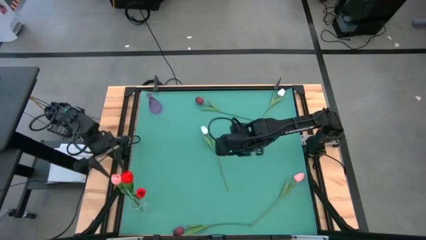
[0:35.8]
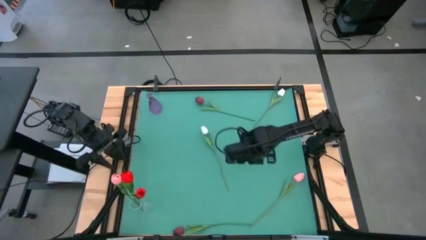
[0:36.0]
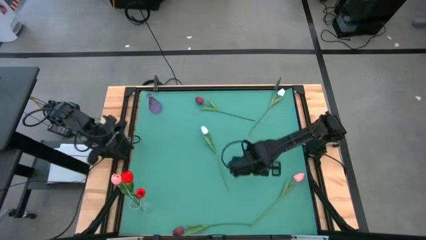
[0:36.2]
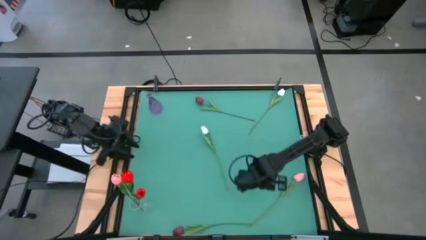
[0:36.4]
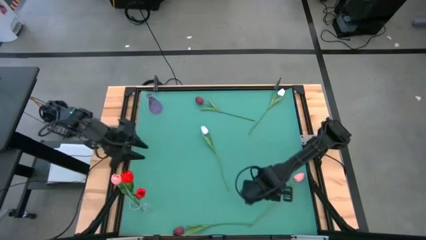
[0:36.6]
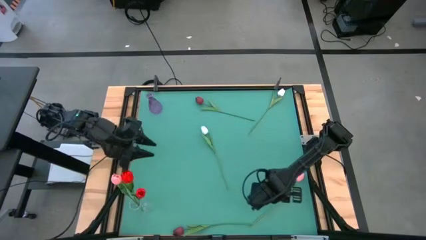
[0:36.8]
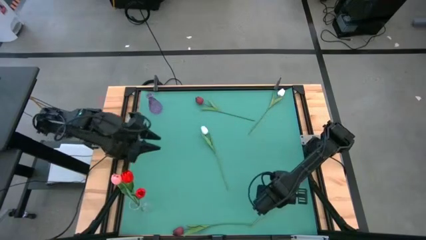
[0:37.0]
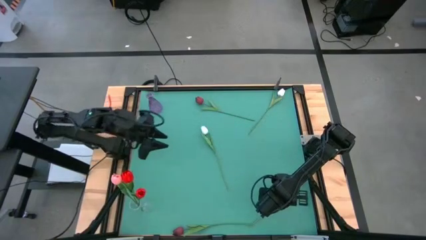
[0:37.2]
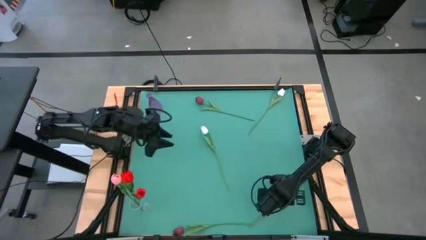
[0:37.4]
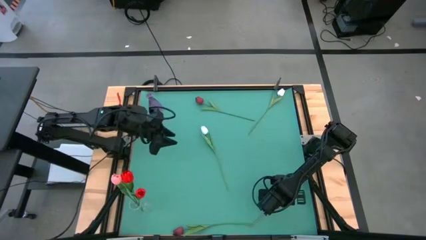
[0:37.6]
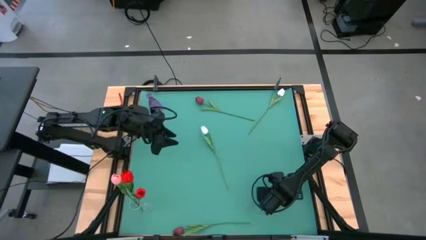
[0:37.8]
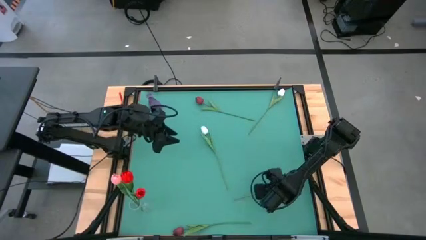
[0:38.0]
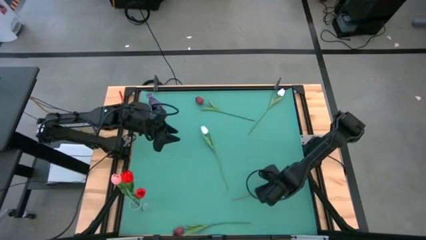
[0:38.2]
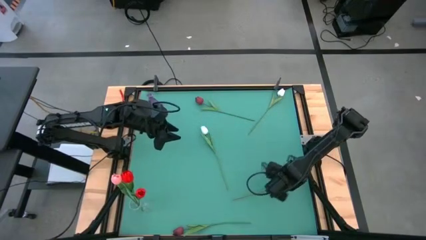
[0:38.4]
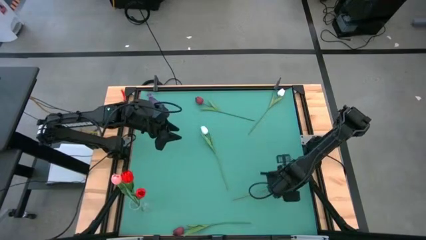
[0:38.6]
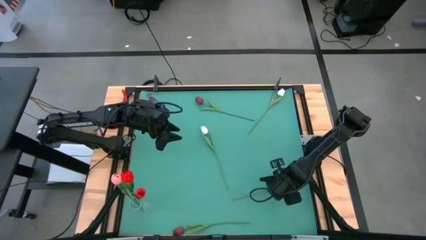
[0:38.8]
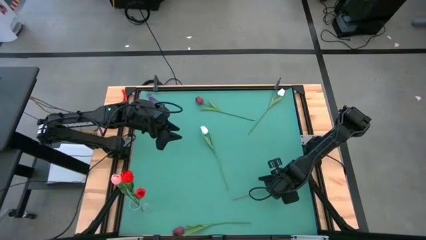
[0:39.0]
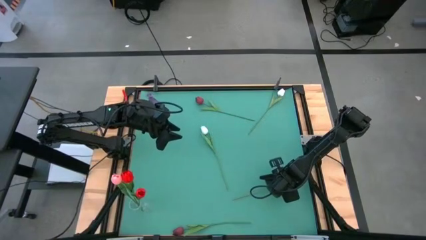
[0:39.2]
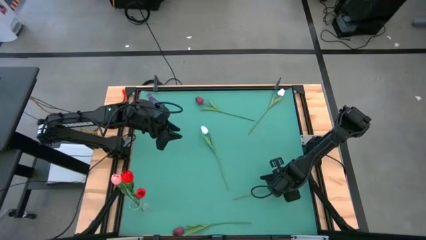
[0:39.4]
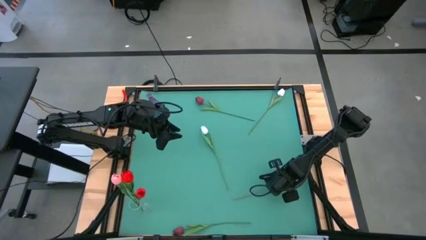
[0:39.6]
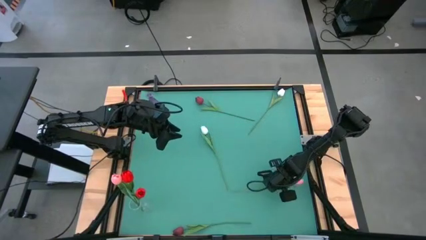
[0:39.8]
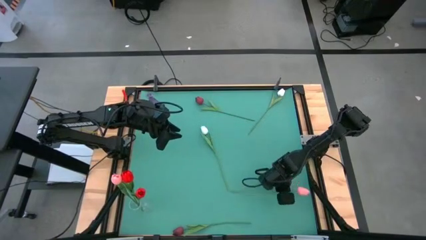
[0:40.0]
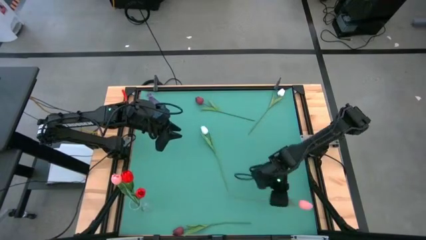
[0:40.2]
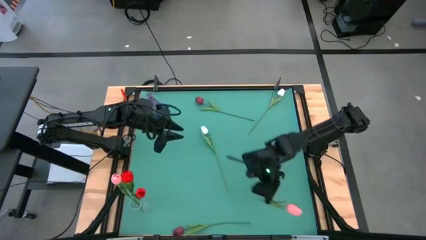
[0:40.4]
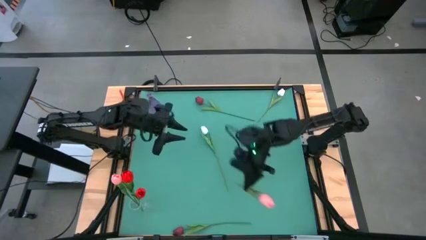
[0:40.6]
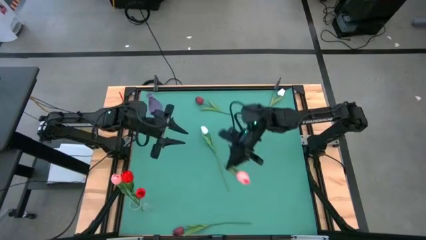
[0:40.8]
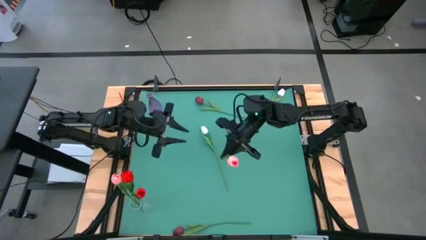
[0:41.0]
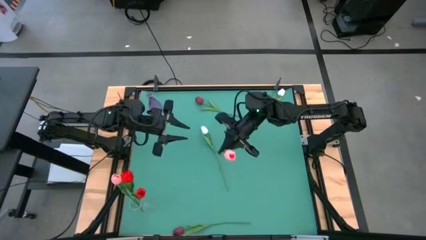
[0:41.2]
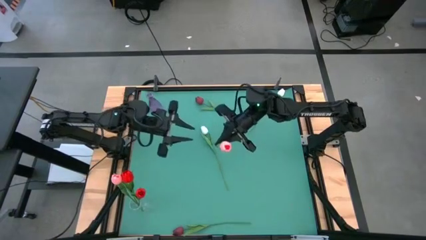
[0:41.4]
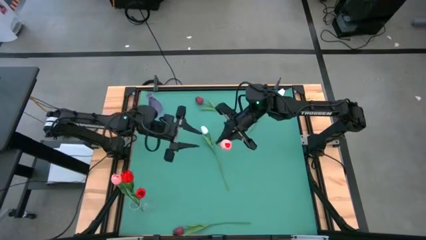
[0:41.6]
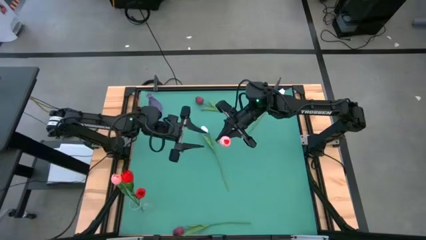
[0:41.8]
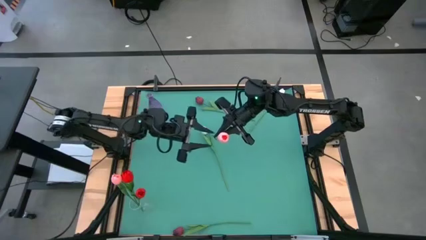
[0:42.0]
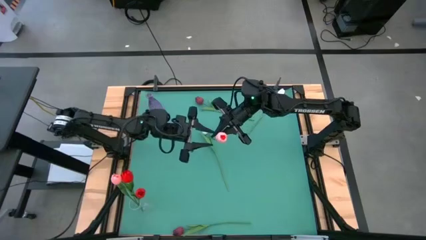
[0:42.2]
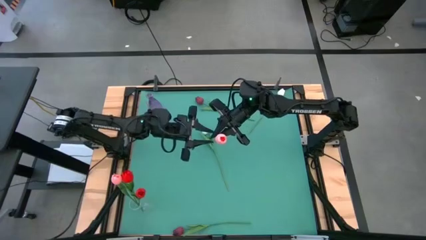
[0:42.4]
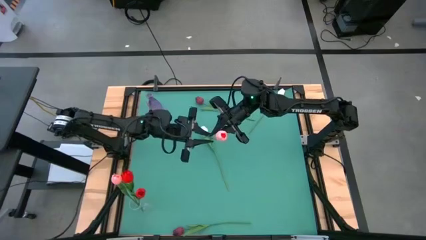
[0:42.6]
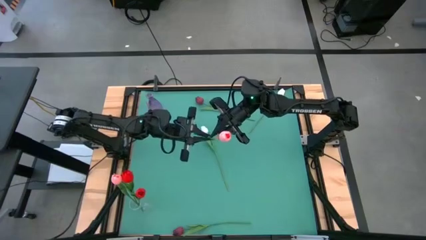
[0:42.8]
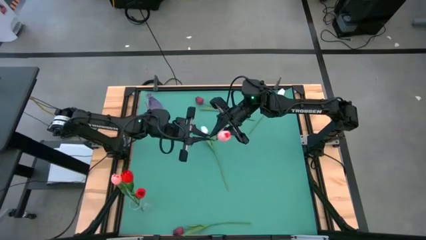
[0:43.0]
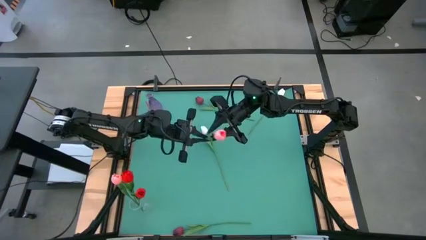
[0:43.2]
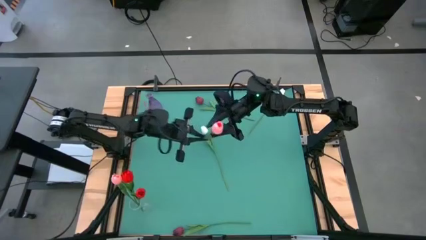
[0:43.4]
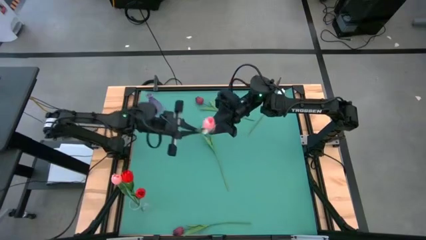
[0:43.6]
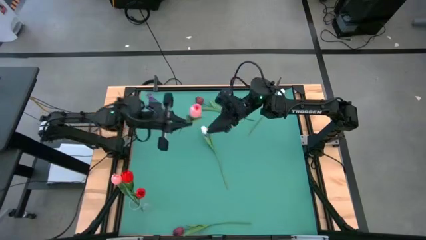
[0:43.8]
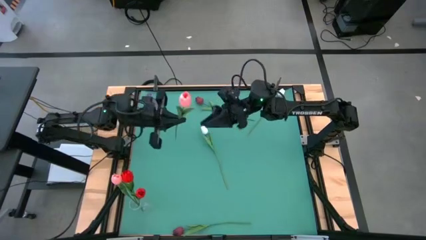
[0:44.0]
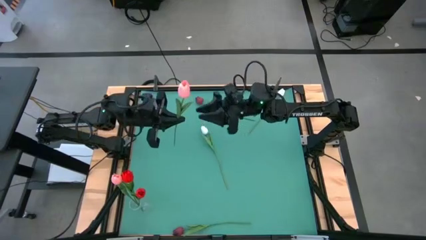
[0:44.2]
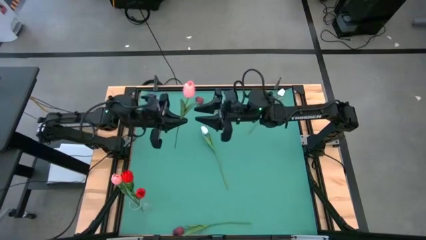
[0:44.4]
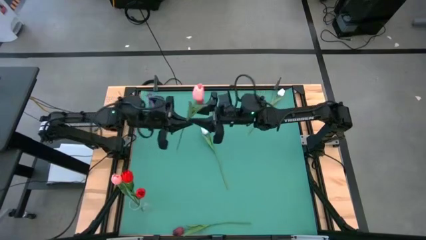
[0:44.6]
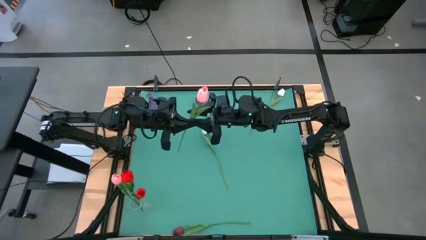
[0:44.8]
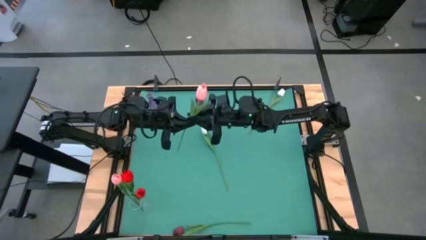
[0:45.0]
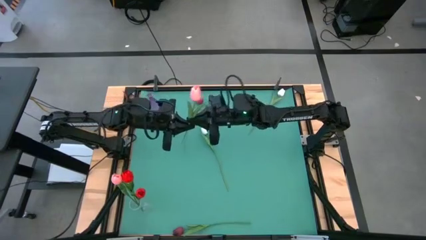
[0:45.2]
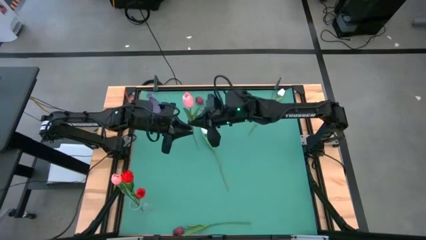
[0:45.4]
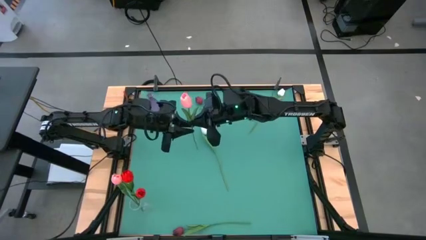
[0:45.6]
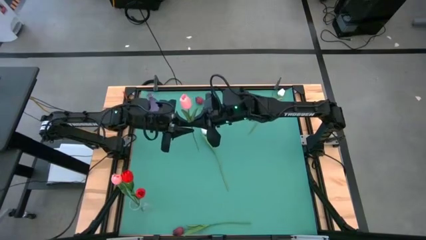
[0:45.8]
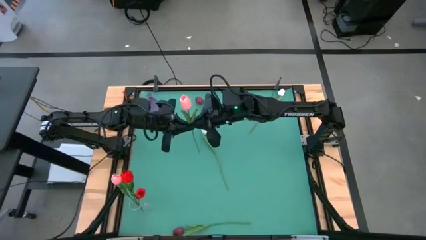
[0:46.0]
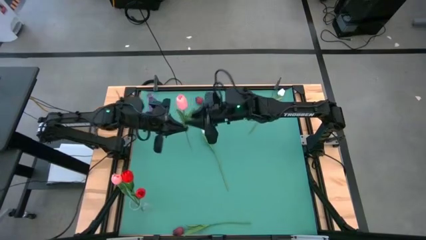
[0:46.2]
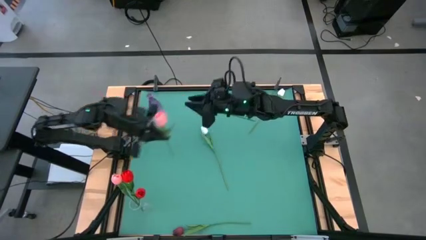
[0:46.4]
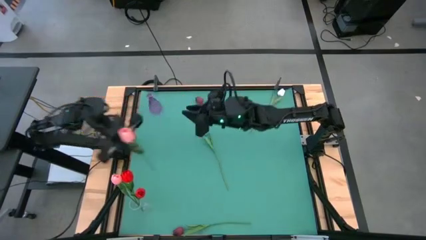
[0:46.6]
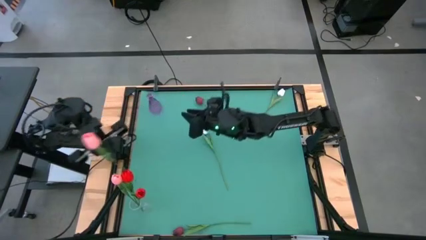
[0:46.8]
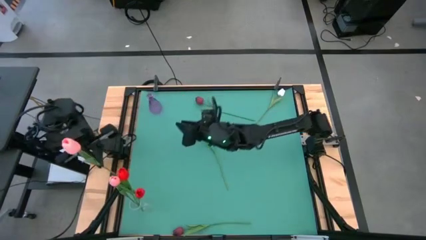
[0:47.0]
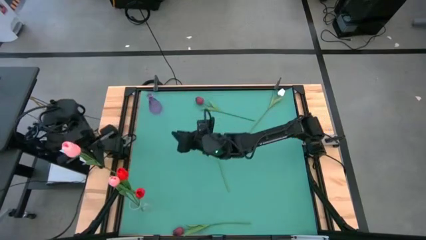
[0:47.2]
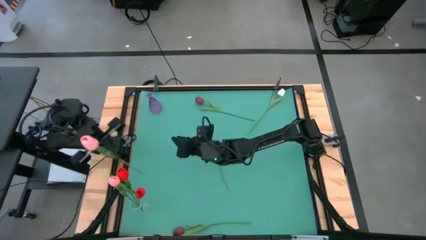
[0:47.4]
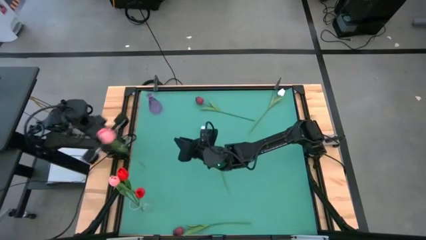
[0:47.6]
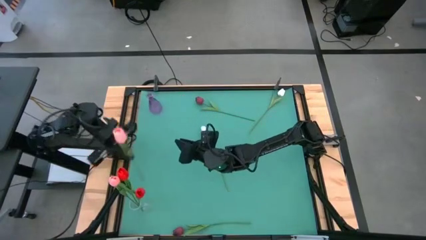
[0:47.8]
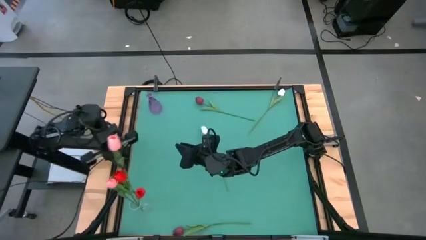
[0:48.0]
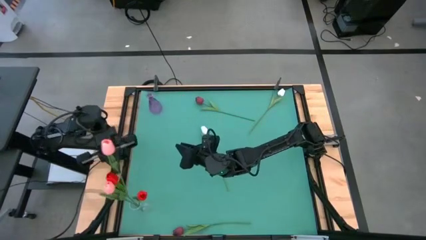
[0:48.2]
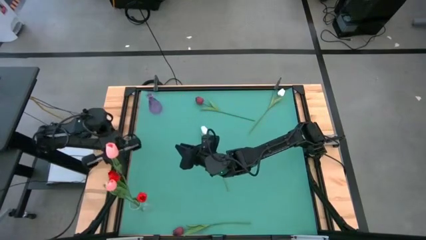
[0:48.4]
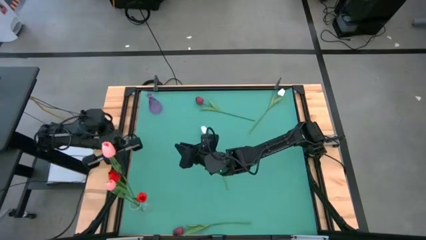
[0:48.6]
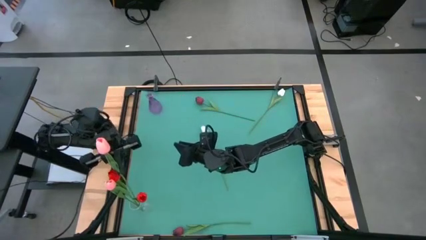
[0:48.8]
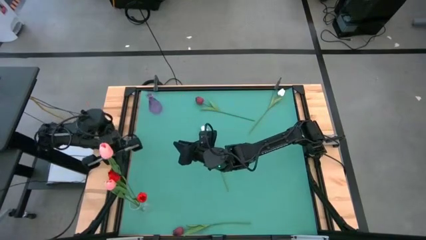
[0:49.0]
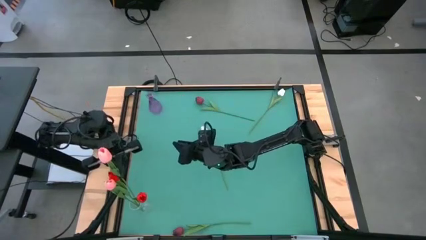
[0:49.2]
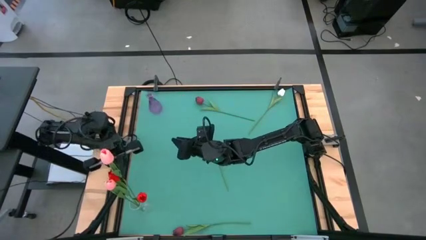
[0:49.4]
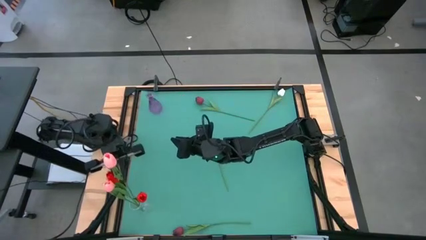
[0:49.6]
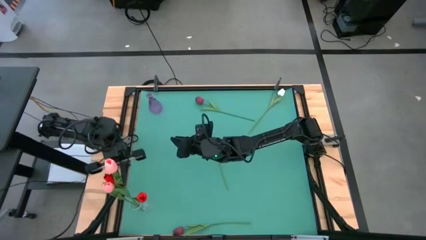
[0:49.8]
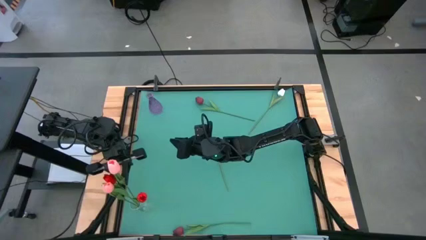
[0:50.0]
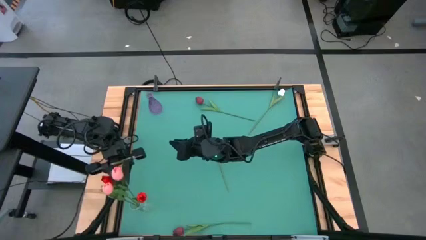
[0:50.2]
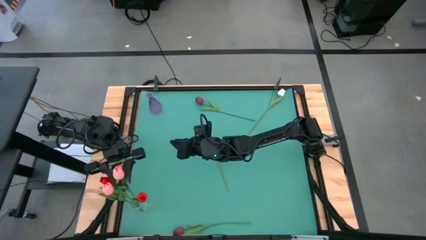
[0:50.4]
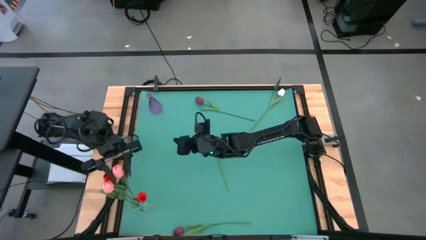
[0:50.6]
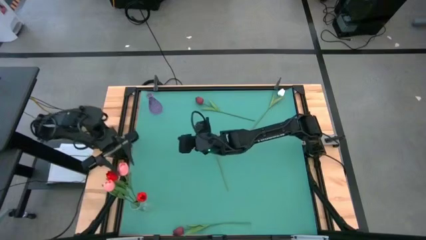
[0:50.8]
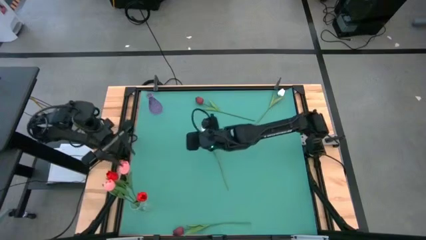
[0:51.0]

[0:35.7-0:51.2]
Task: Sort flowers into vase by color
Put the pink flower into the transparent vase

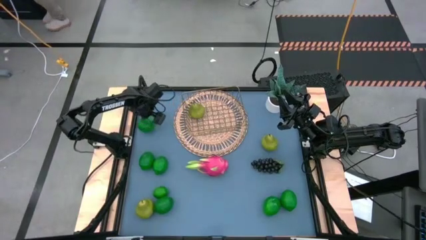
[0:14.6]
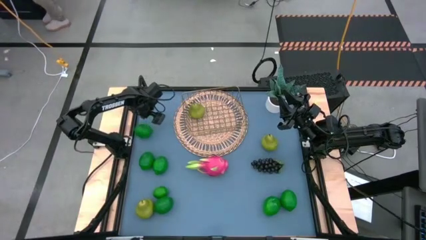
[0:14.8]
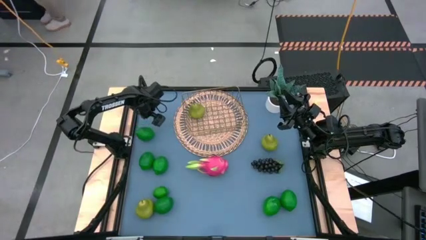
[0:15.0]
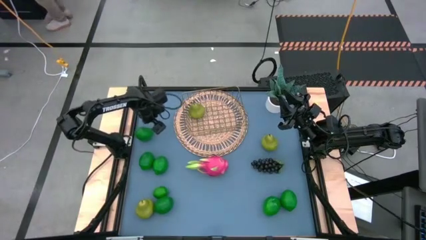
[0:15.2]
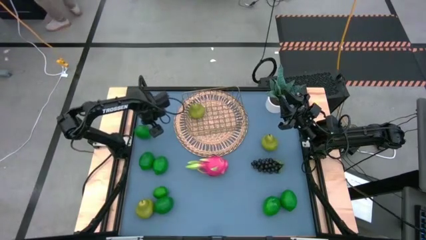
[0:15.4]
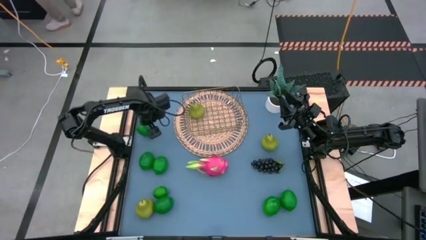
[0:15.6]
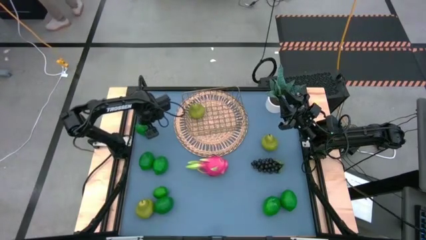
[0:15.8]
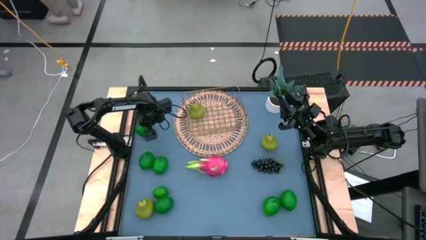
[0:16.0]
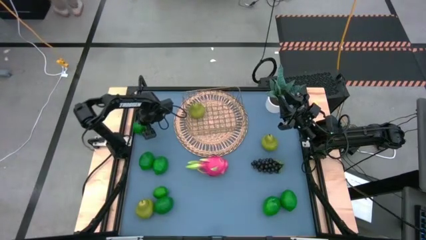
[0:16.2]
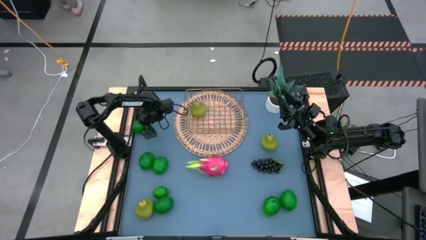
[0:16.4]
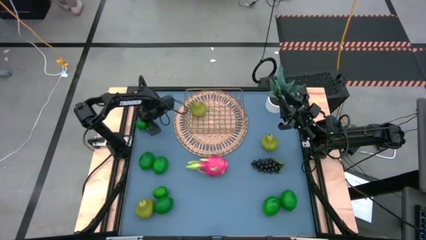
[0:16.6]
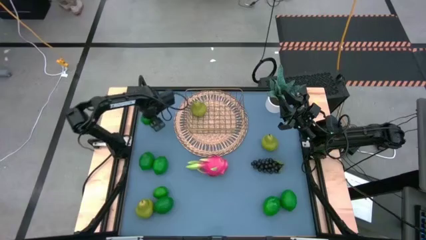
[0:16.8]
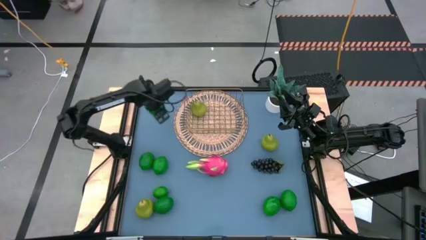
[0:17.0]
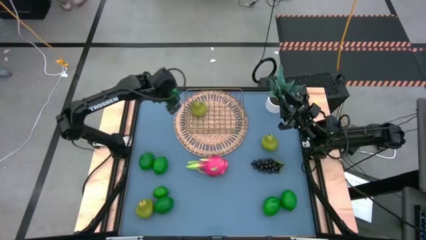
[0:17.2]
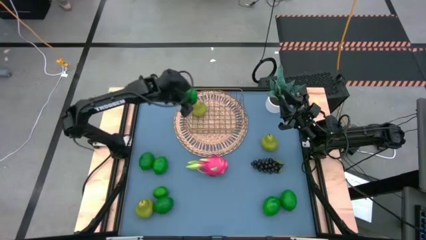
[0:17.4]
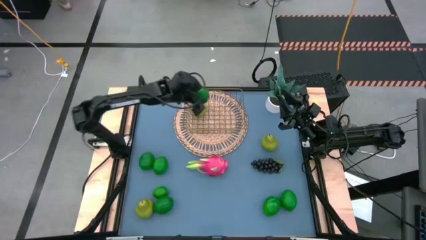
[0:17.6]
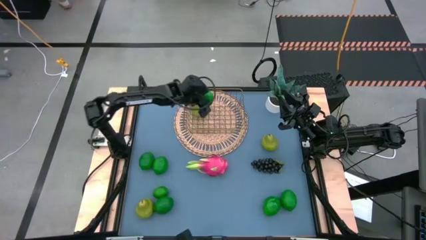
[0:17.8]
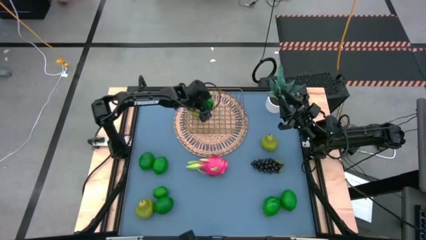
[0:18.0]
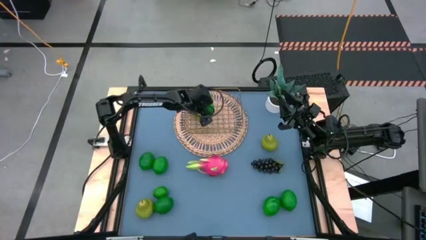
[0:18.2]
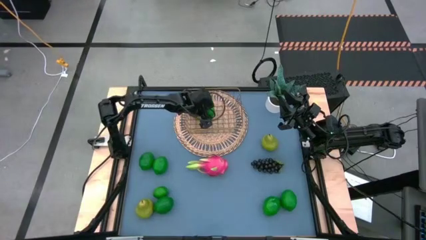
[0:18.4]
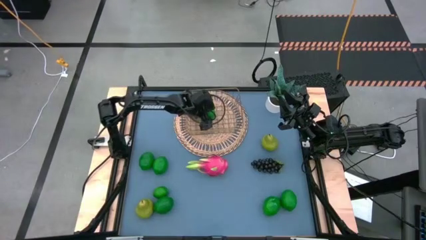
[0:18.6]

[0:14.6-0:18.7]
Task: Build produce basket
Put the green lime into the gold wire basket
